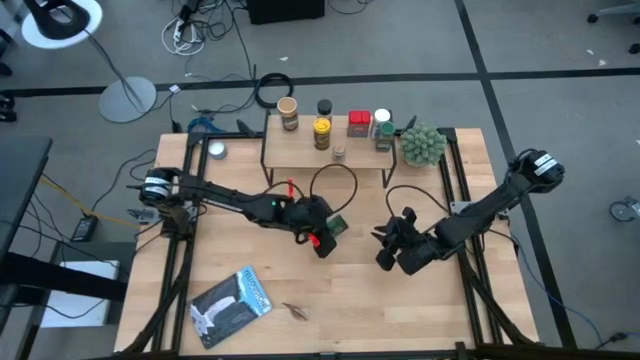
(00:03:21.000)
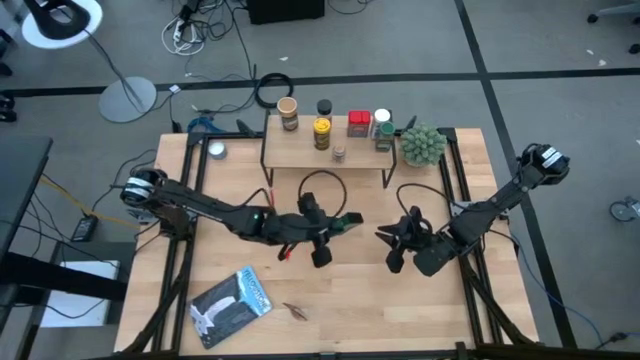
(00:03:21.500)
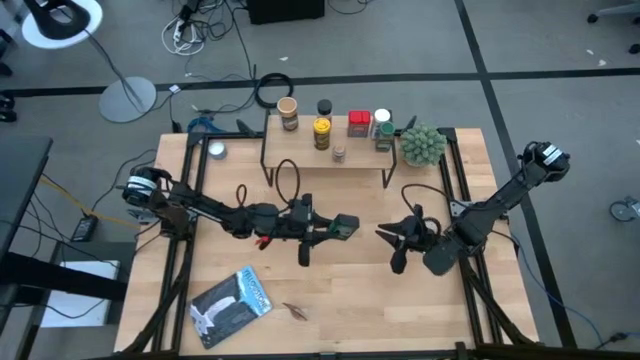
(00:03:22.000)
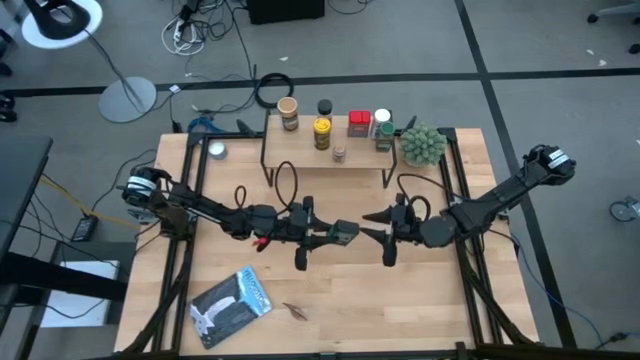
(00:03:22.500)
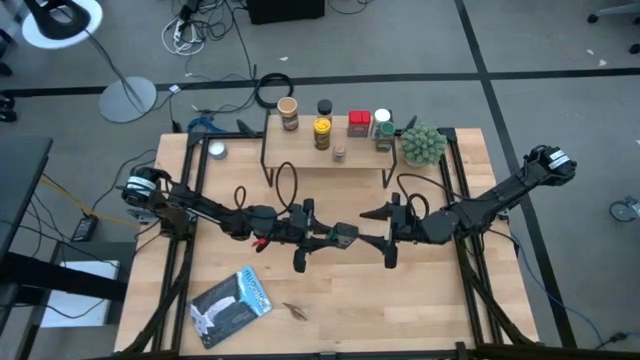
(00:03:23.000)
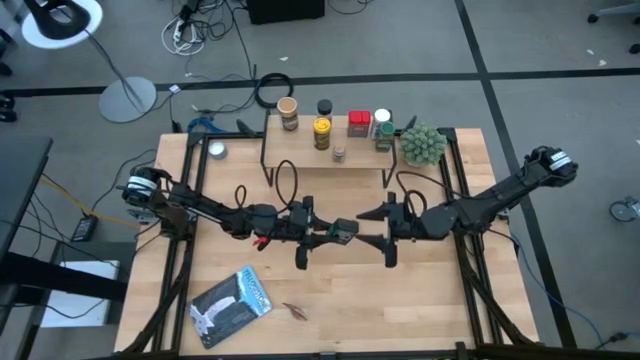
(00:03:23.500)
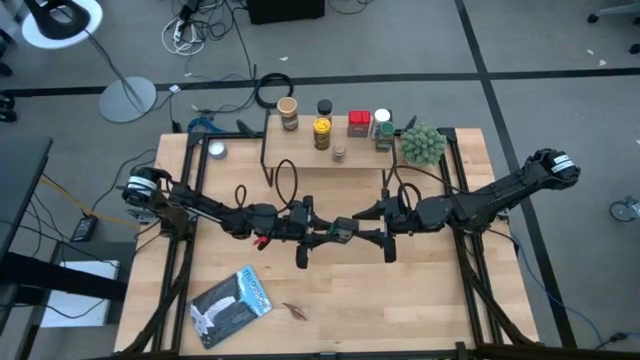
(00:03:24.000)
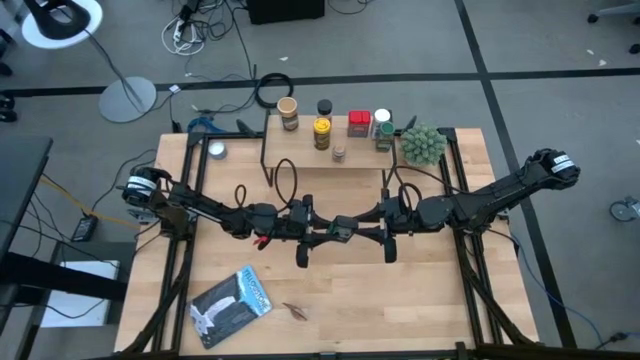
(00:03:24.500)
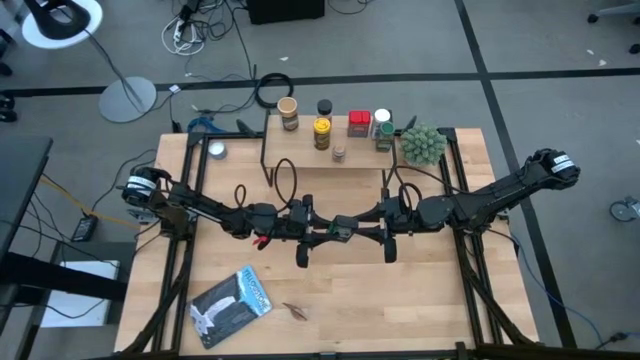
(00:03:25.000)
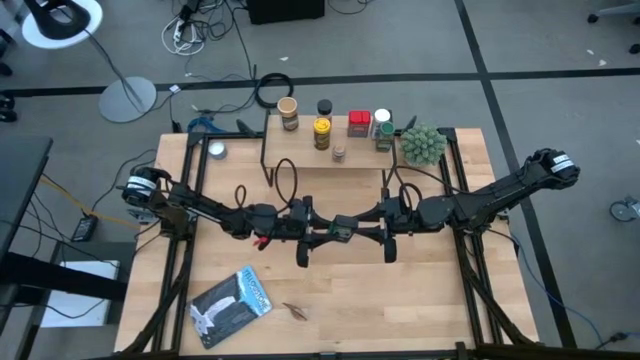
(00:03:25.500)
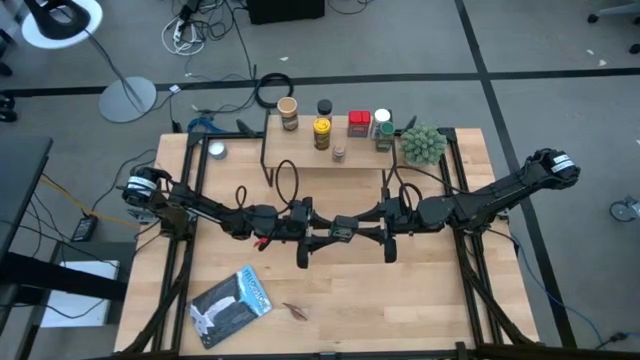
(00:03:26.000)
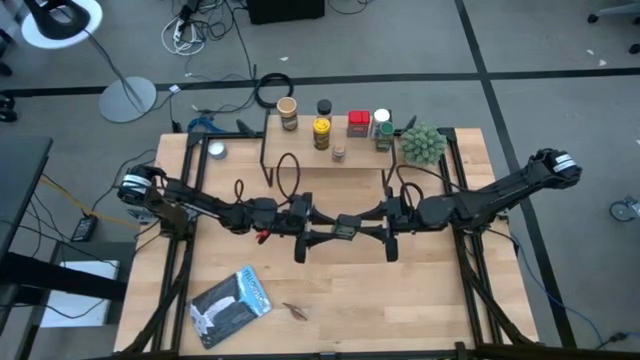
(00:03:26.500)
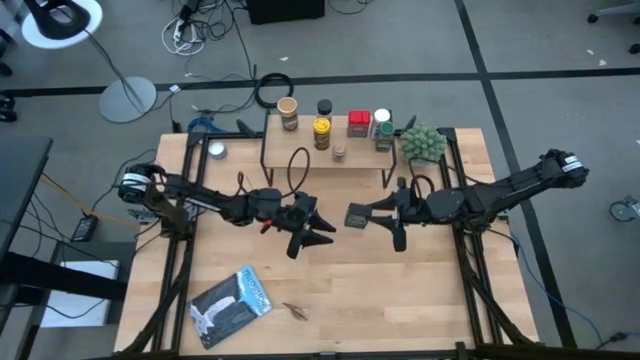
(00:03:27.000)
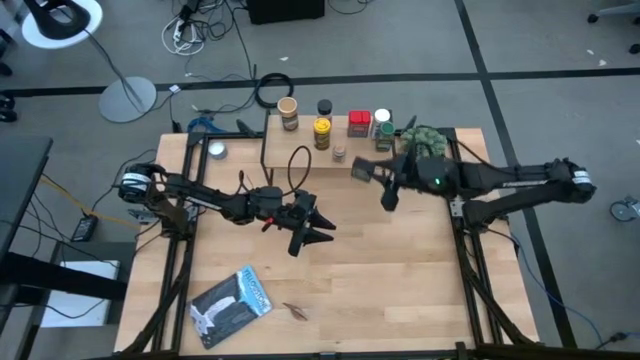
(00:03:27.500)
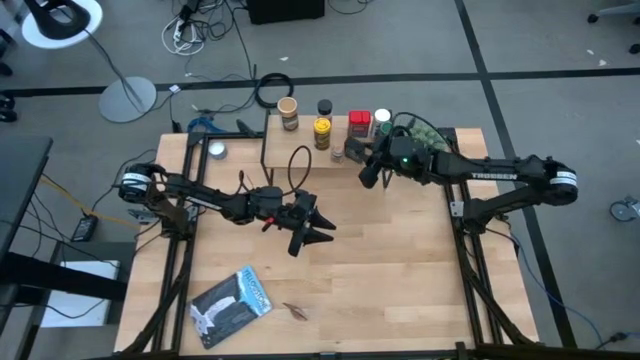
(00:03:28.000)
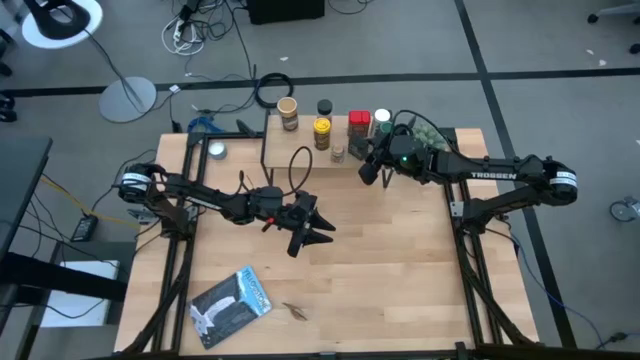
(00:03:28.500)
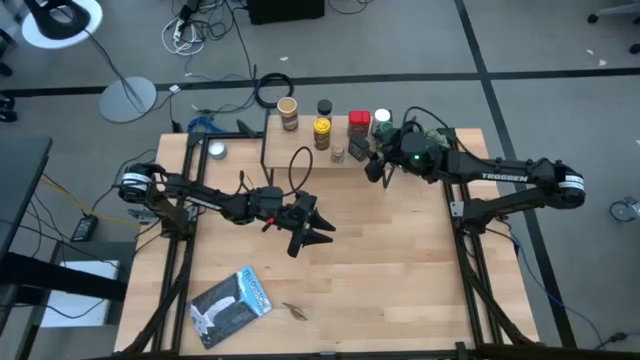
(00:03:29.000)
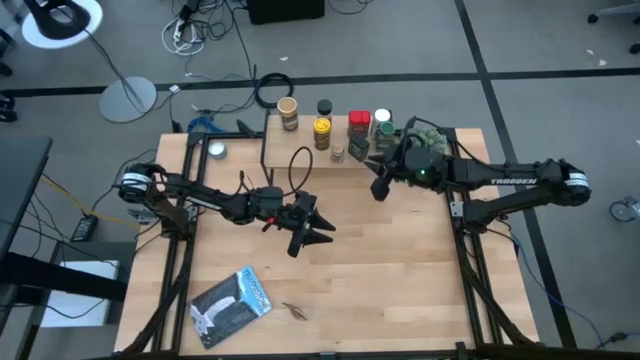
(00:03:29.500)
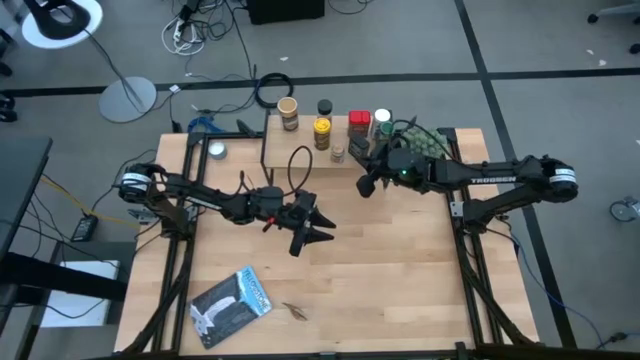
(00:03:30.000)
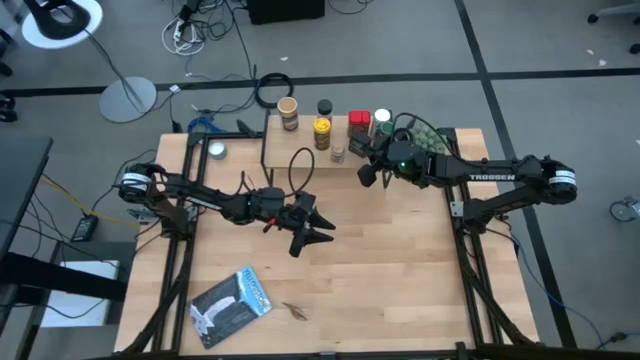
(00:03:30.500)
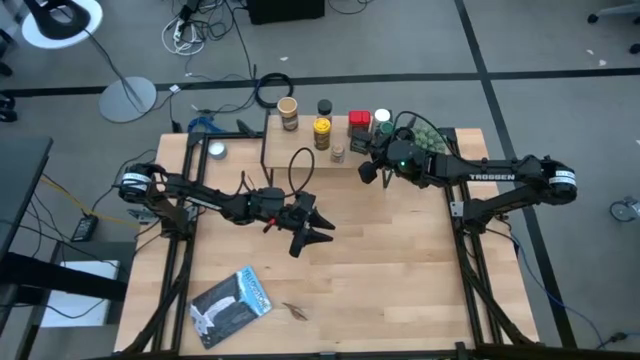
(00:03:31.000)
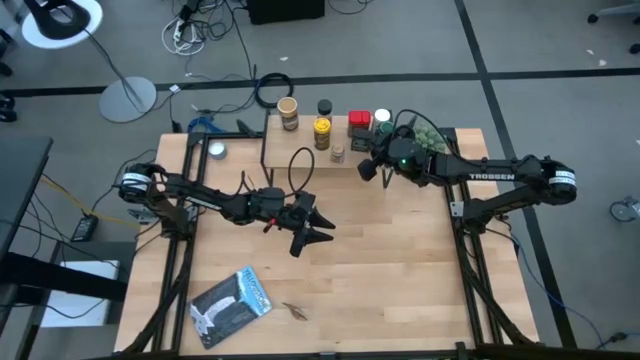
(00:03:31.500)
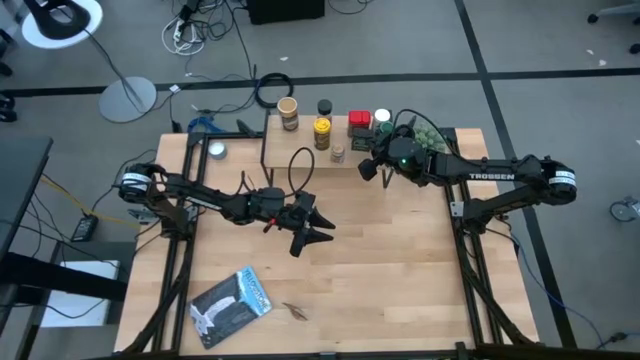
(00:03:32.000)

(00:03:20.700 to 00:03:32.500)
Task: Shelf spices
Put the green seasoning can on the shelf aligned with the other red seasoning can

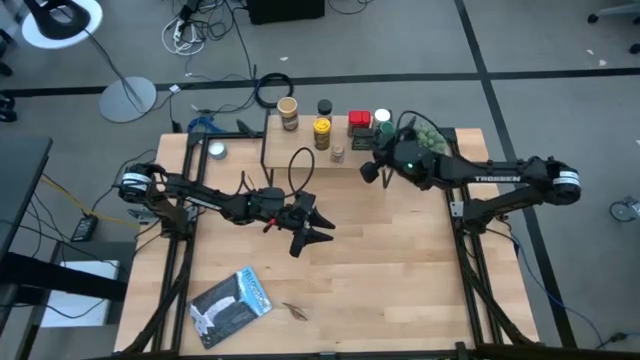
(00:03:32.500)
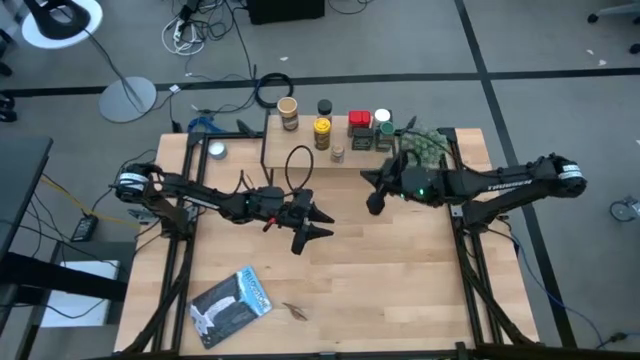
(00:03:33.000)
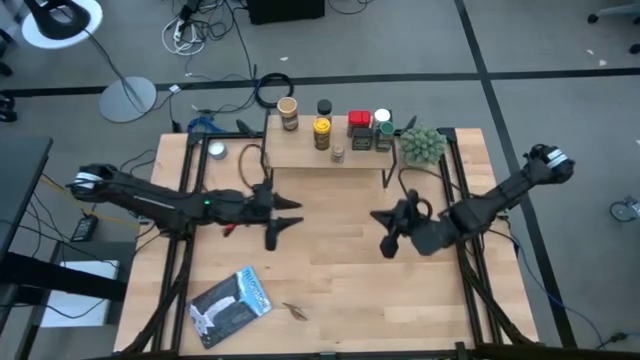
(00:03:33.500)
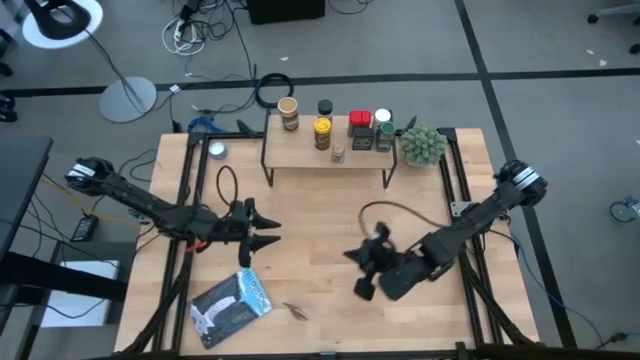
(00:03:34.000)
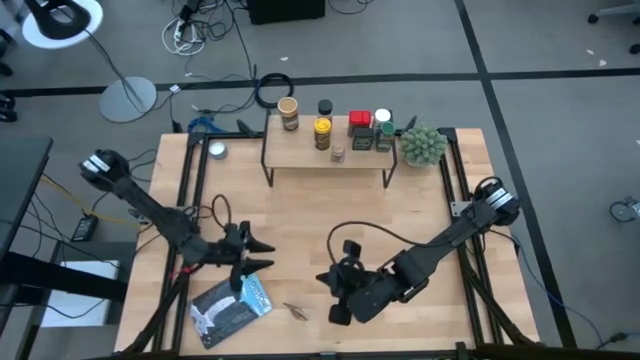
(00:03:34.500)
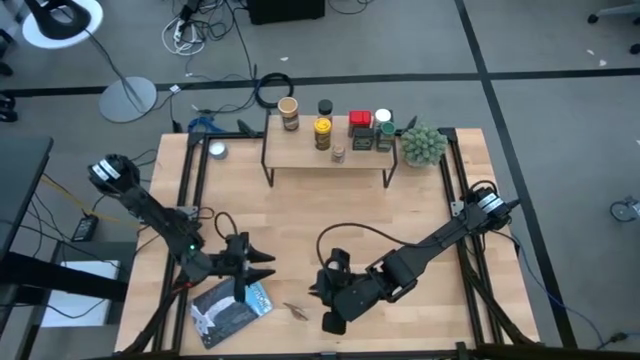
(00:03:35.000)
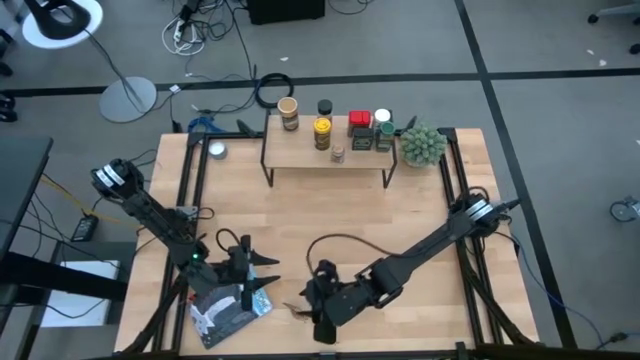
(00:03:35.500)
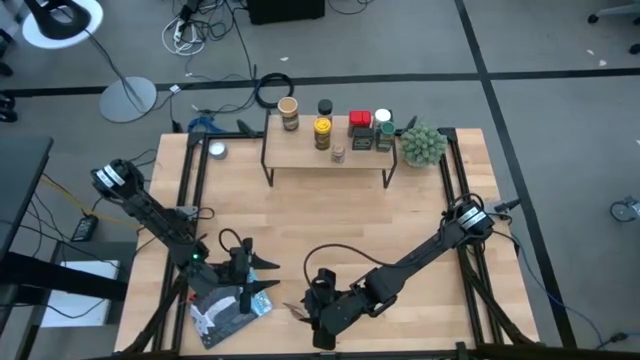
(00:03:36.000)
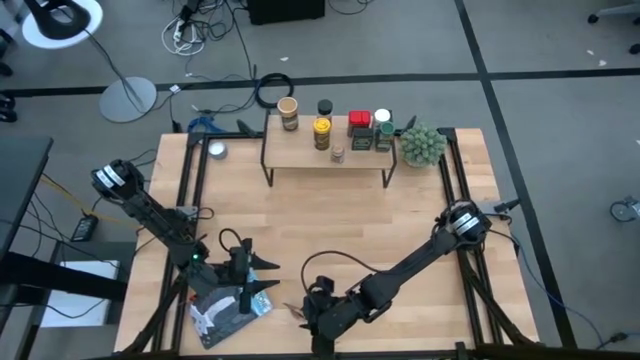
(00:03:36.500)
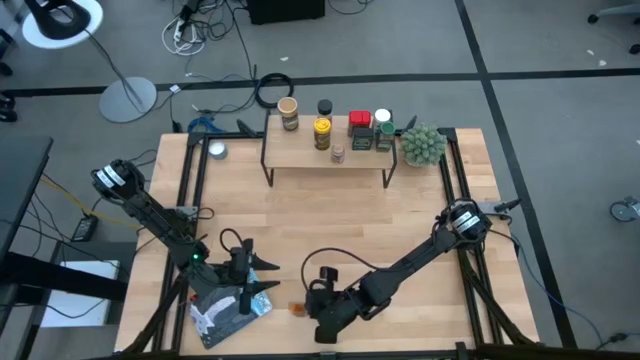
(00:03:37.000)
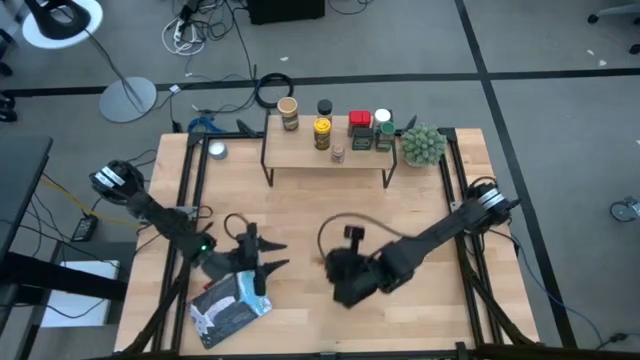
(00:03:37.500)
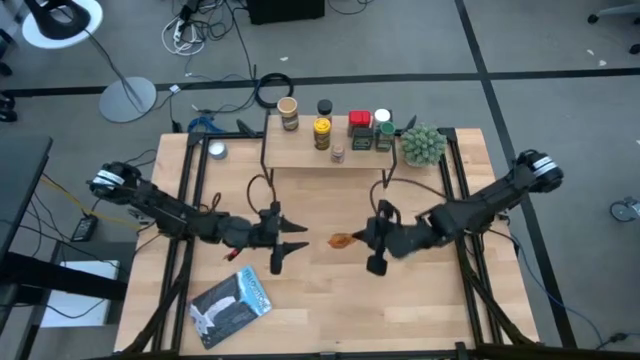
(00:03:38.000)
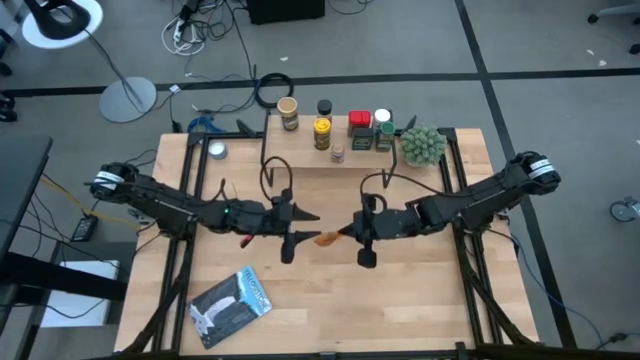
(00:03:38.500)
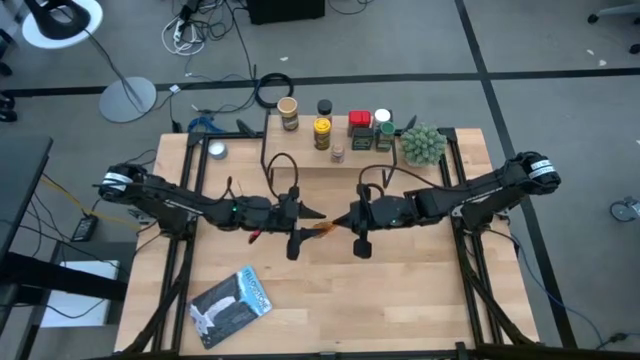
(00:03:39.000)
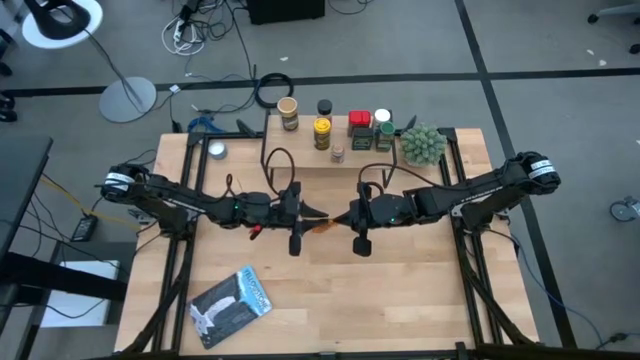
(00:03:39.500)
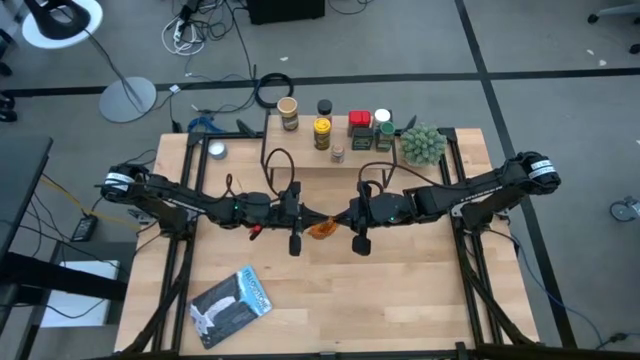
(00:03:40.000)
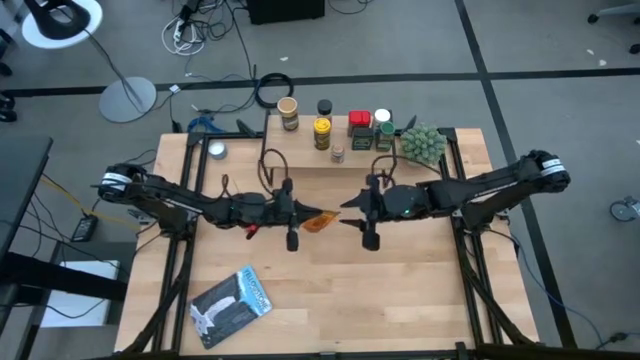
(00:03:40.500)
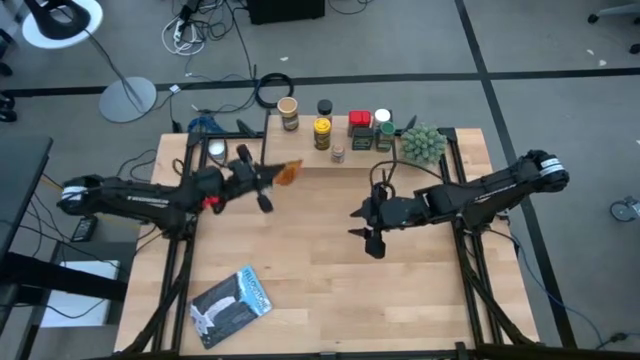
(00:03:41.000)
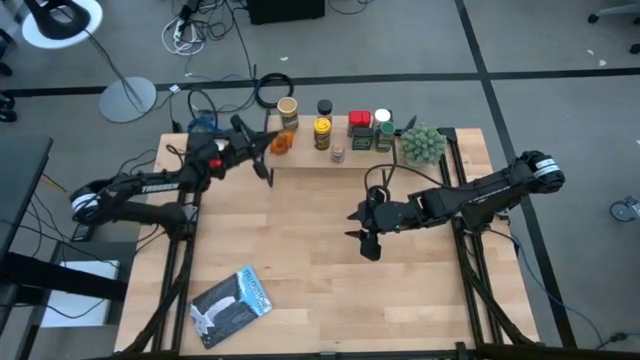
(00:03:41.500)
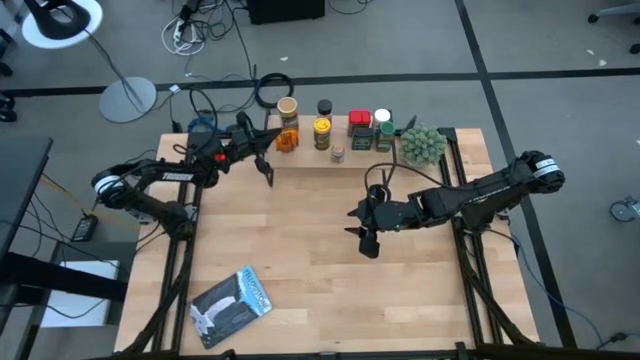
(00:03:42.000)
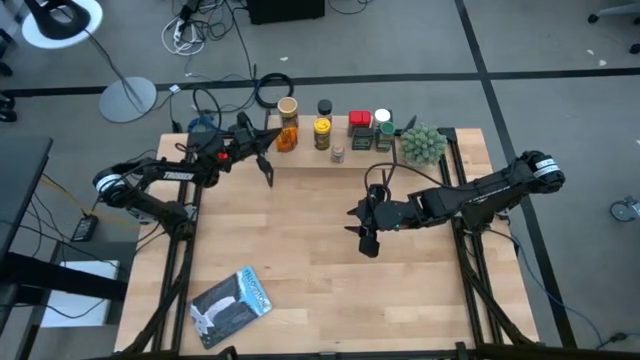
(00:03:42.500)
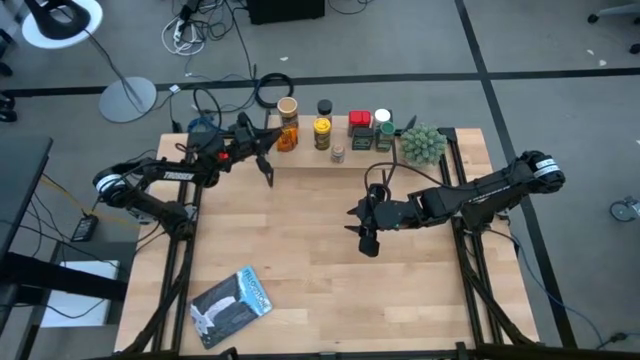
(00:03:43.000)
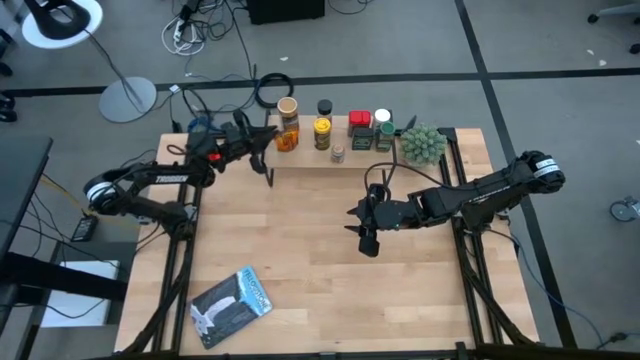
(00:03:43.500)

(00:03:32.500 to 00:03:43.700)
Put the orange seasoning bag on the shelf aligned with the other brown seasoning bottle
